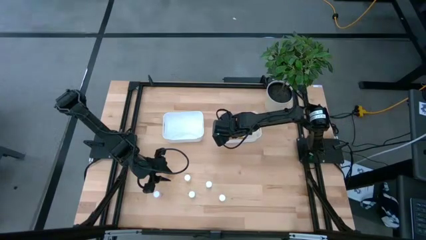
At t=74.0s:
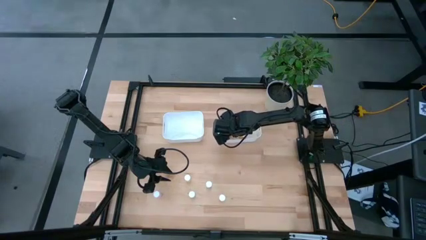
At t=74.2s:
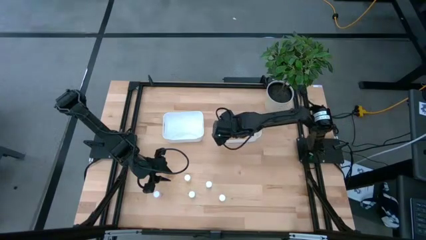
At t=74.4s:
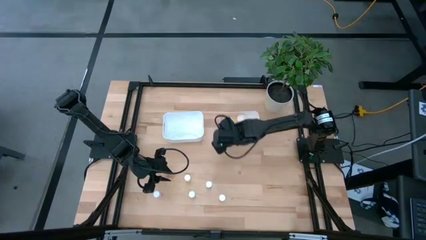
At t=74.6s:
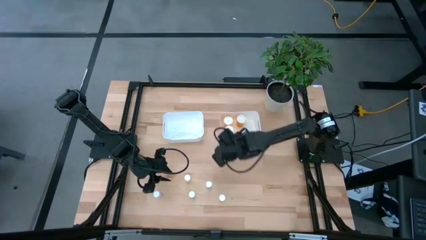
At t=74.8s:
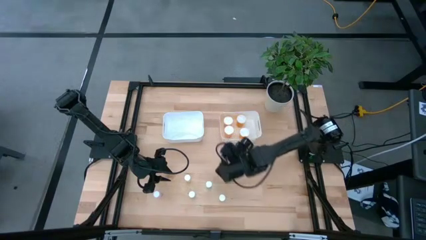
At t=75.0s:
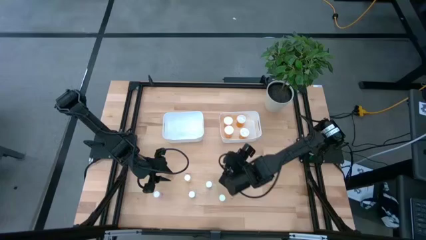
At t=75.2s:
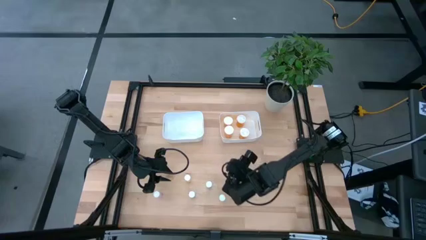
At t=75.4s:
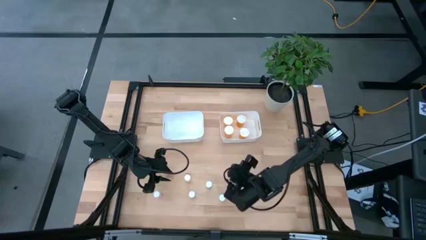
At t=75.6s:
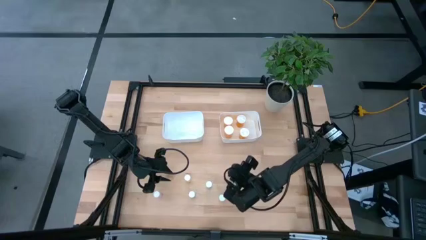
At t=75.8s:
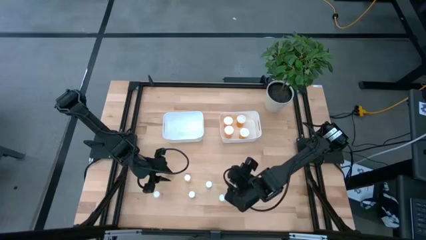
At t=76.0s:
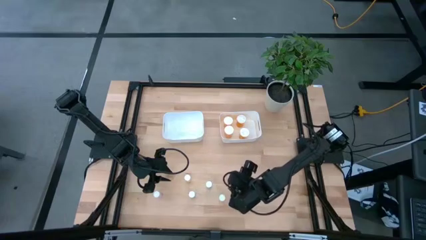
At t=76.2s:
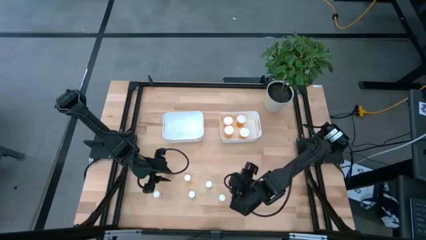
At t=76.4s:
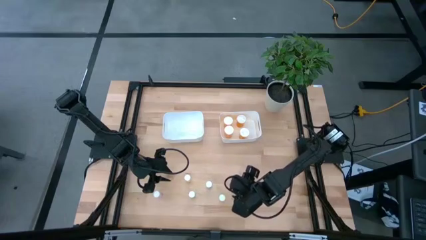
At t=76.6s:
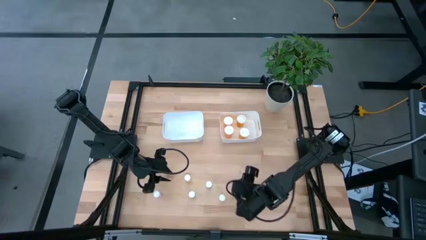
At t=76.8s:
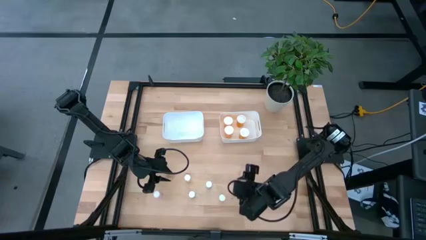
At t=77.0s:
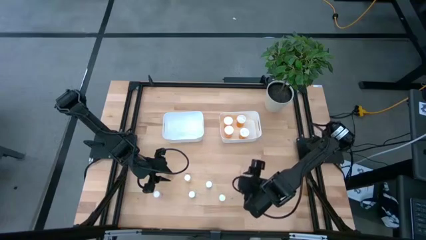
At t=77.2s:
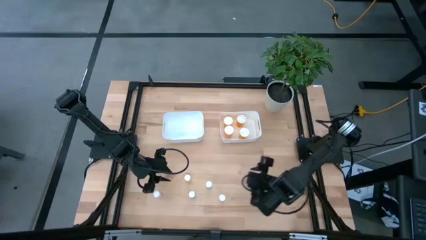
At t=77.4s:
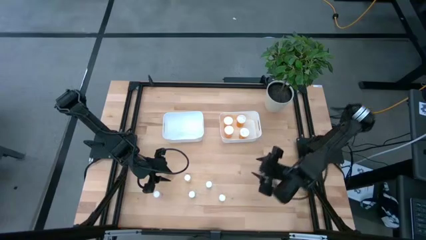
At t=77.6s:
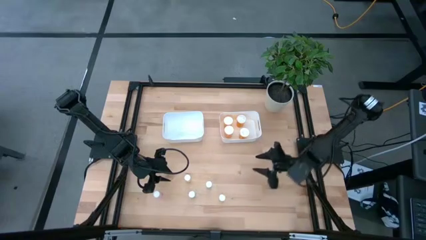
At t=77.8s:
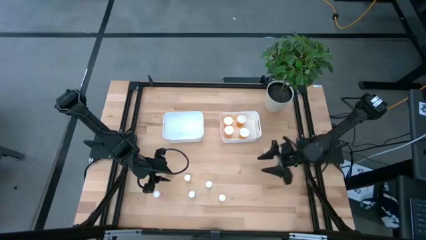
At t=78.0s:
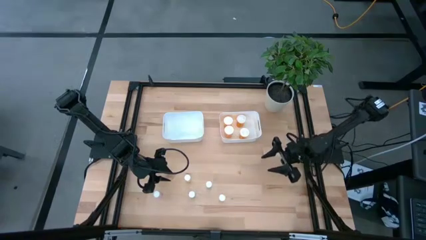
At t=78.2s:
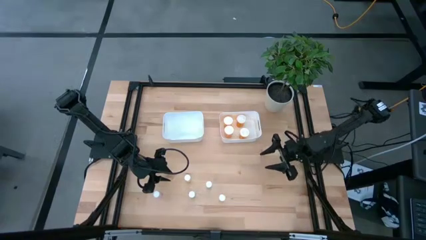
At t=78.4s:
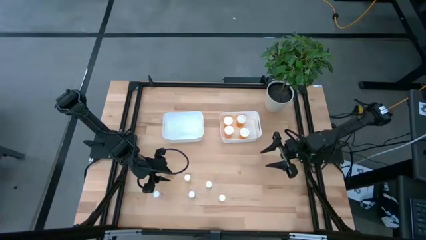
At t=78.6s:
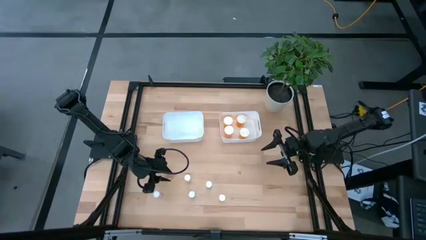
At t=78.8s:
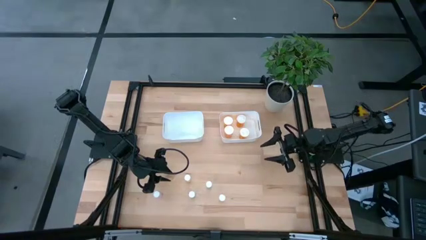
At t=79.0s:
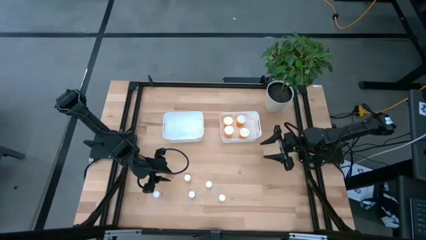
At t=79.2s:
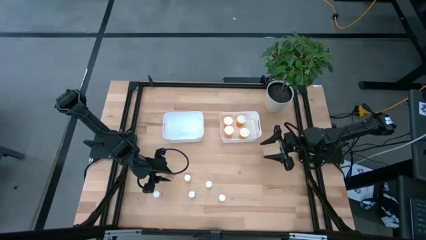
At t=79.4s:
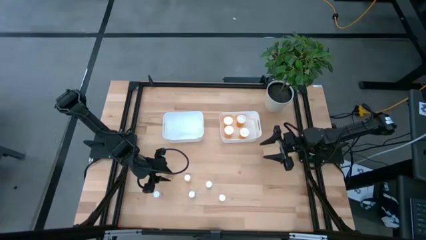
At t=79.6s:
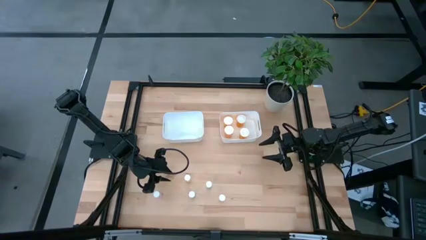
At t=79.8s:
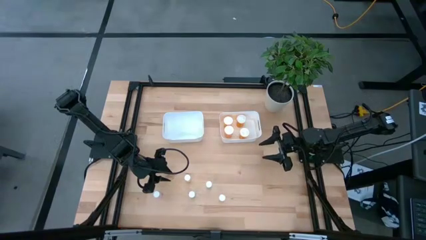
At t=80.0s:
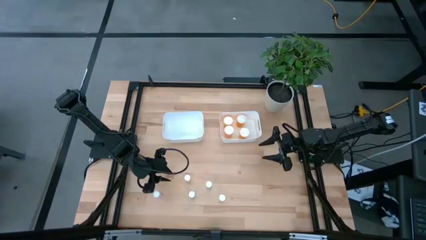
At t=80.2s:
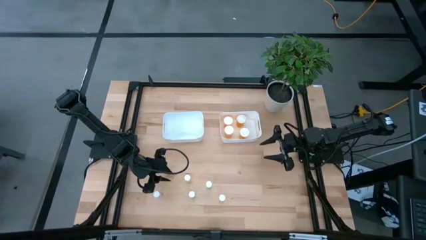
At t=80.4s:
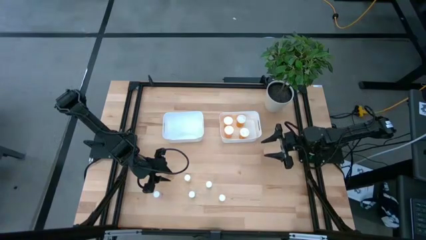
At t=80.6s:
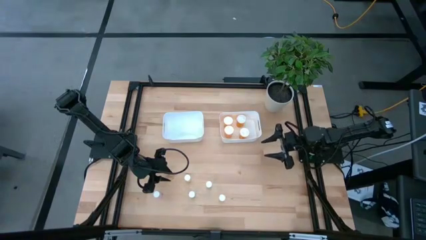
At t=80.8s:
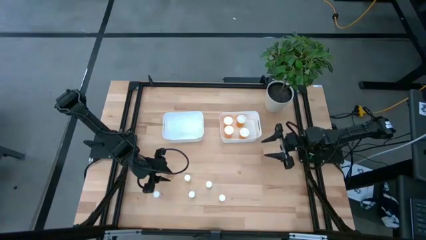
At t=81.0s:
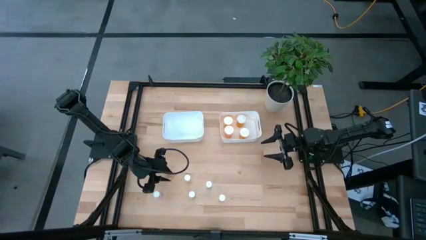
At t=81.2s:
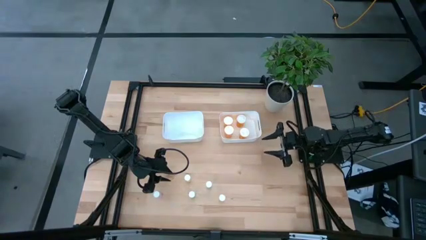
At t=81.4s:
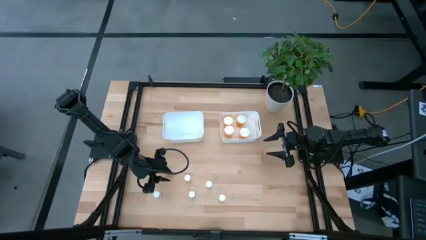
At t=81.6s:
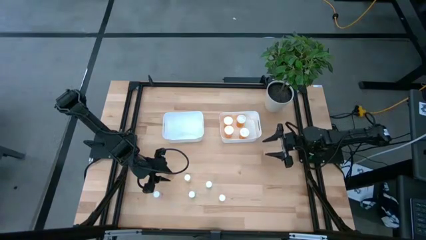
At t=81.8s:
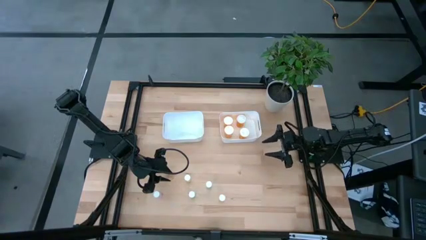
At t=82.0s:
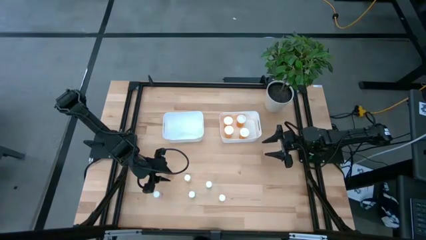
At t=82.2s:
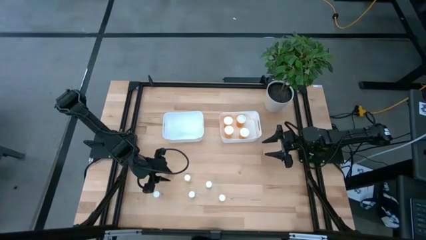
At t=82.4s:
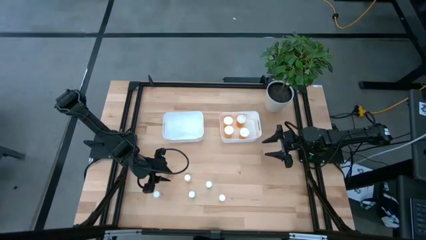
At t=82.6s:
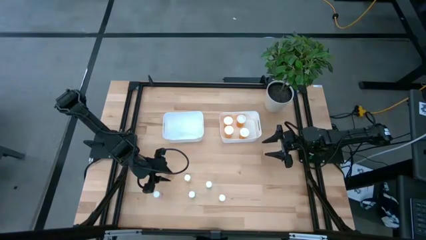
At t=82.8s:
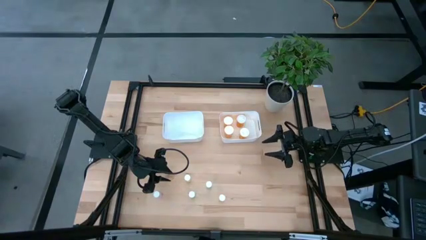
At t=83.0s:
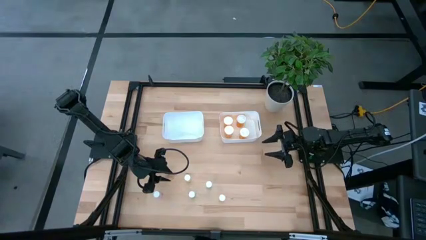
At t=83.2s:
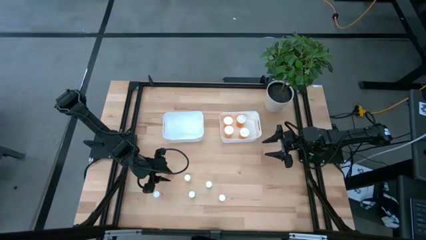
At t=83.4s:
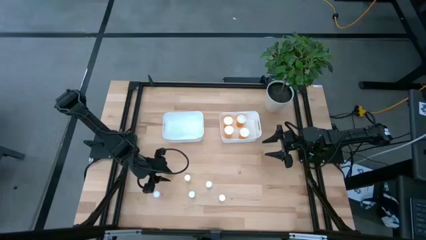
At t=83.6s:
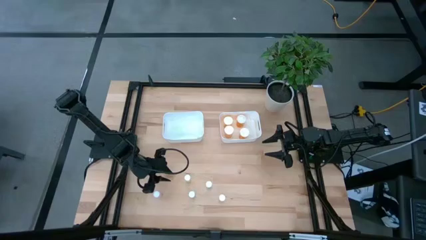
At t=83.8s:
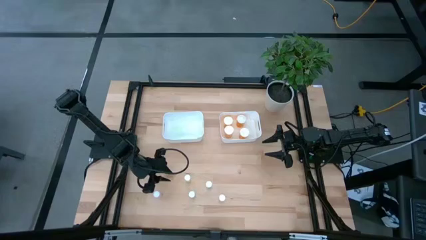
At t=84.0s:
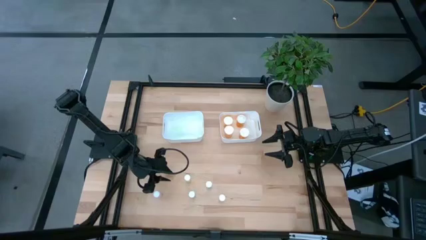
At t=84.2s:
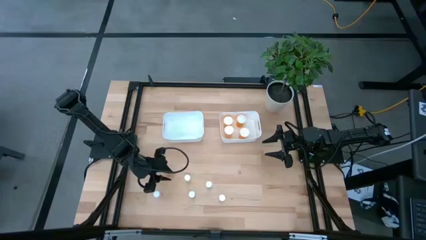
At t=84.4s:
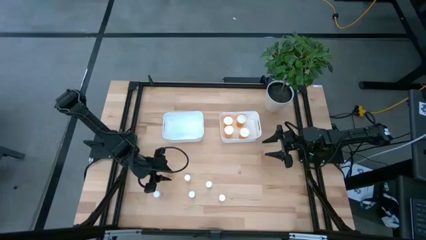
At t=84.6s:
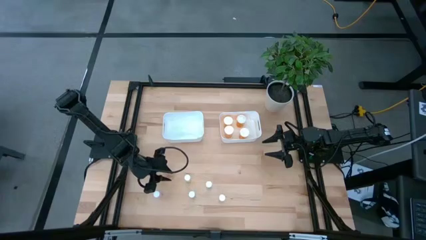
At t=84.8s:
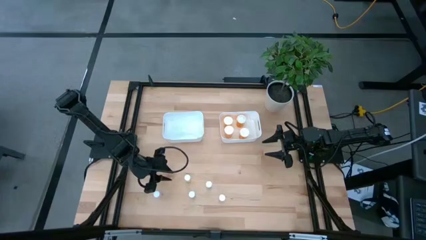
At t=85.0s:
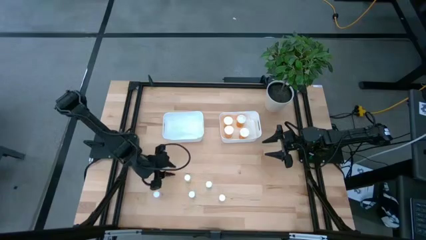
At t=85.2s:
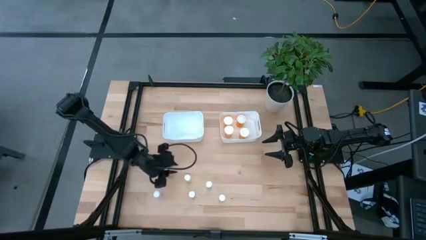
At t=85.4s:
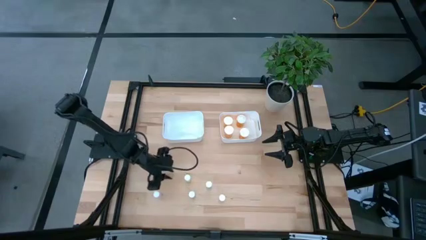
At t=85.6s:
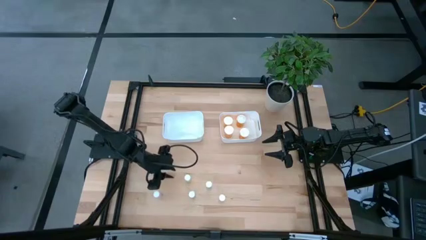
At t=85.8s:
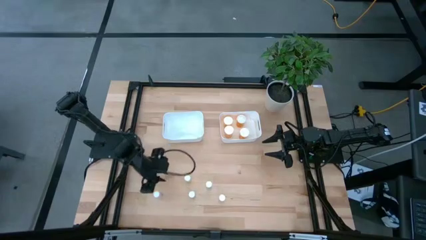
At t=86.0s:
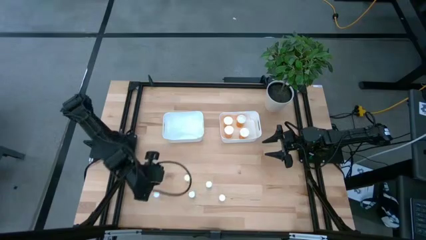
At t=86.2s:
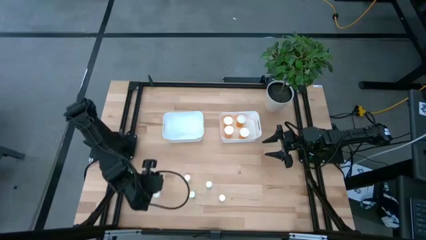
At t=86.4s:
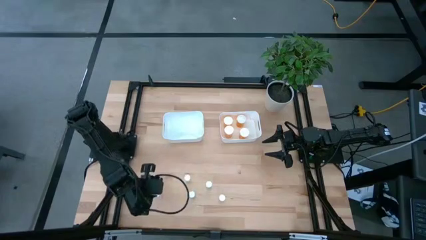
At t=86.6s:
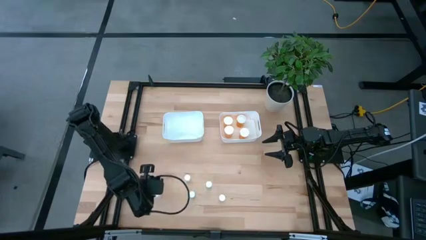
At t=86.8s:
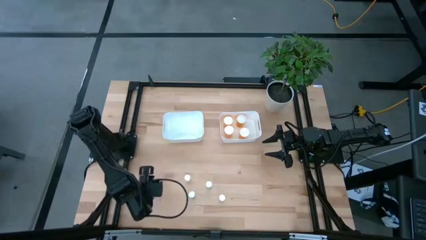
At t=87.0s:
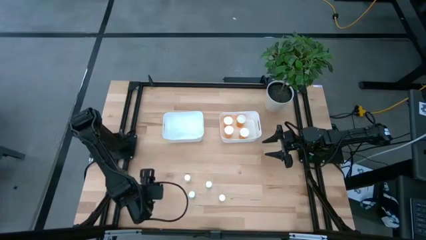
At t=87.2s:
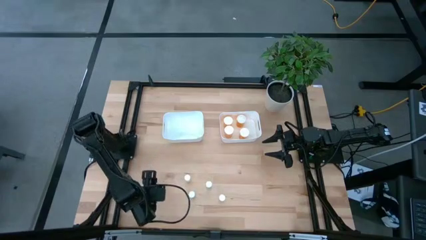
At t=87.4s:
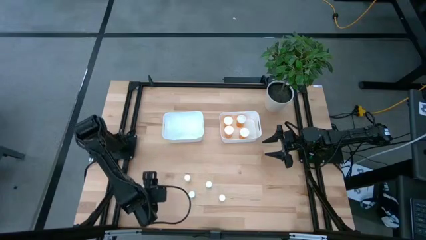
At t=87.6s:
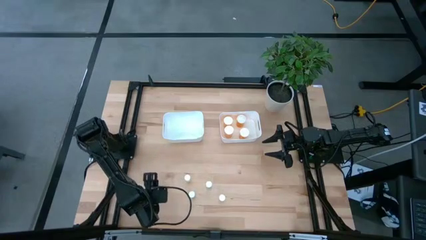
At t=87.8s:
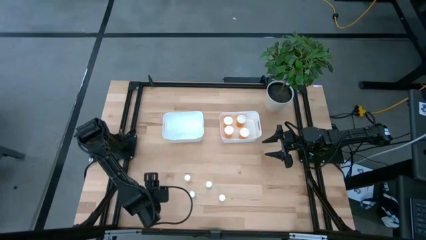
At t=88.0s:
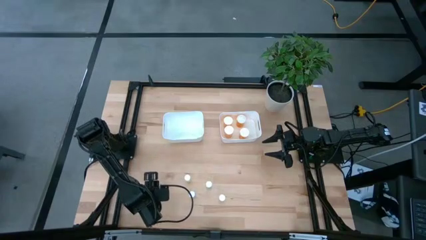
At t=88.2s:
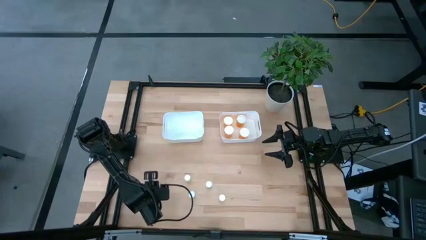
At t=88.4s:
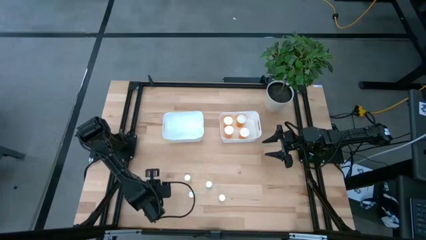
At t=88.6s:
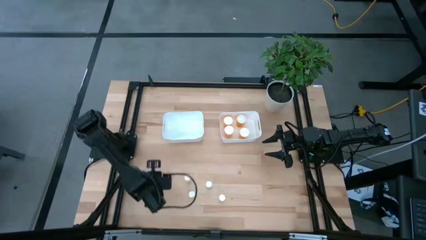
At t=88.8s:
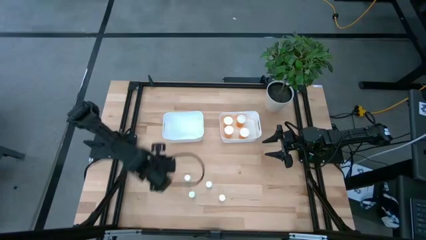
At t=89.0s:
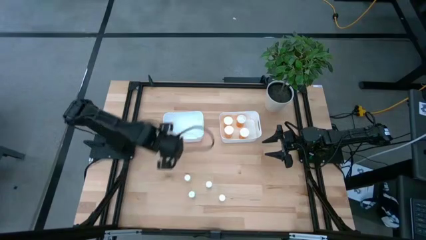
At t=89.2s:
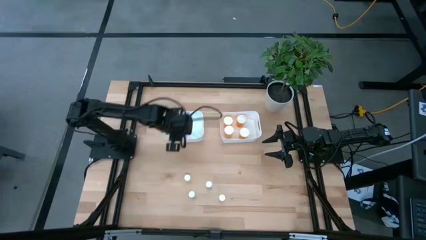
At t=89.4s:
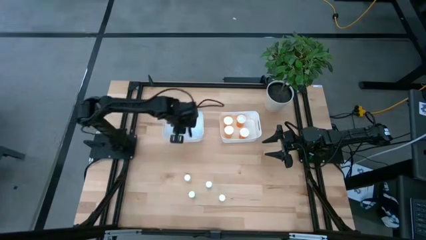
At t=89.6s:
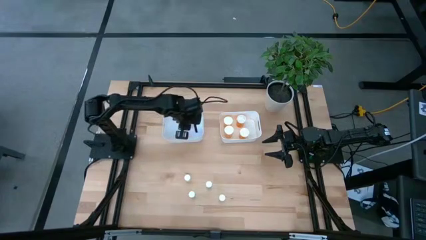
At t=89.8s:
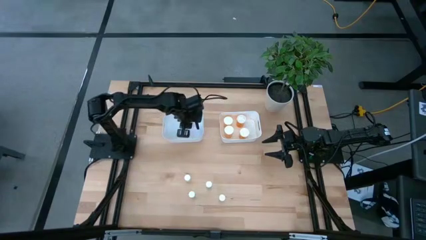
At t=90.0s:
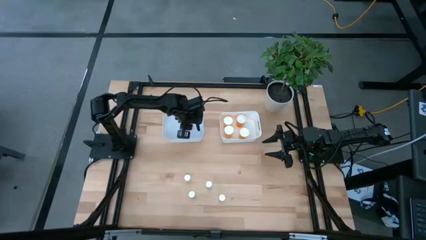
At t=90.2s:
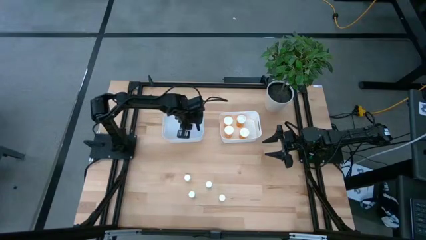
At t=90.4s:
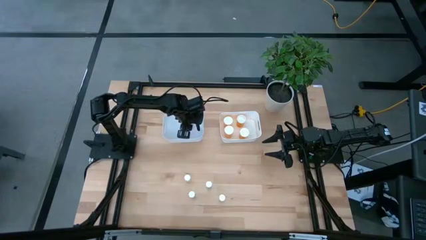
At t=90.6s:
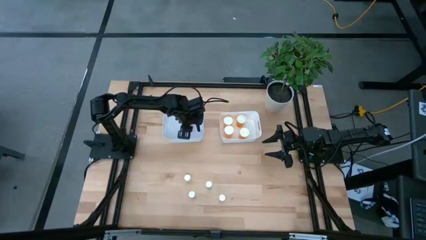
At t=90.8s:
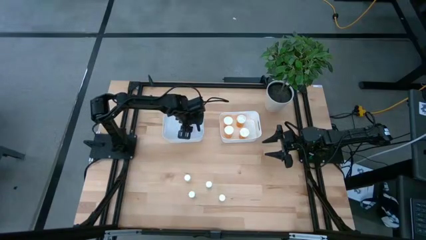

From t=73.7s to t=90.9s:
Task: Pick and place medicine bottles into bin by pill shape (circle, oval)
Put the pink pill bottle into the left white bin
